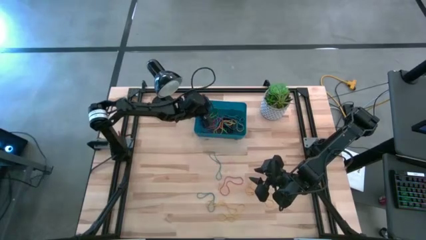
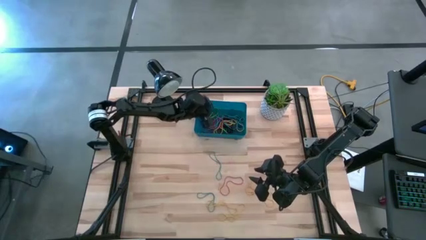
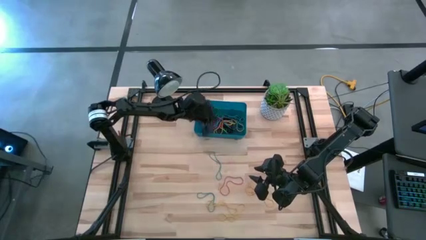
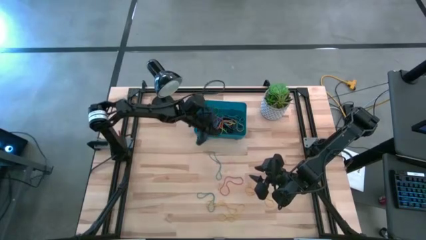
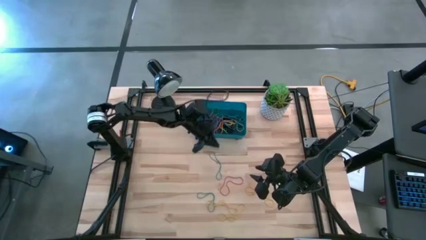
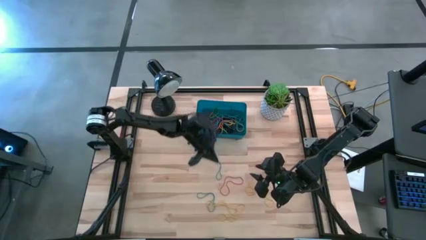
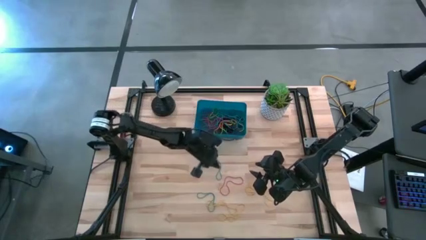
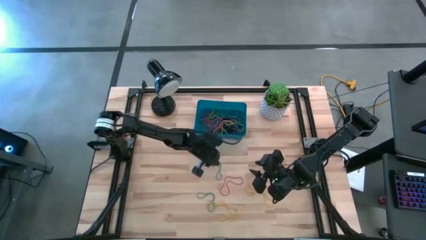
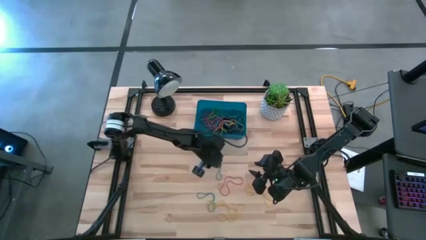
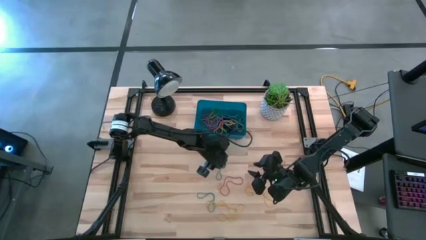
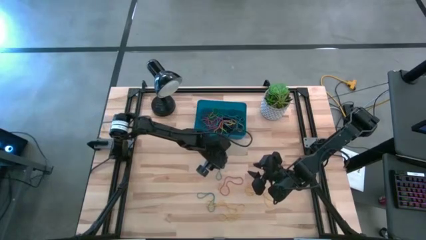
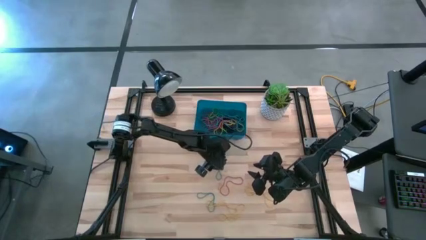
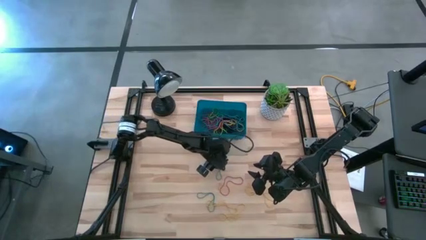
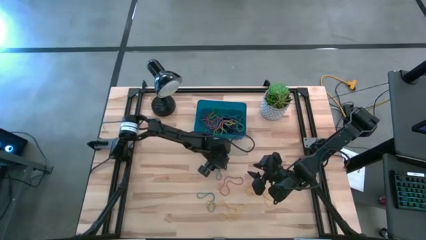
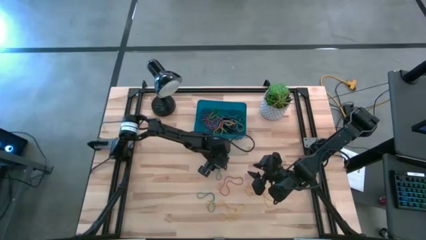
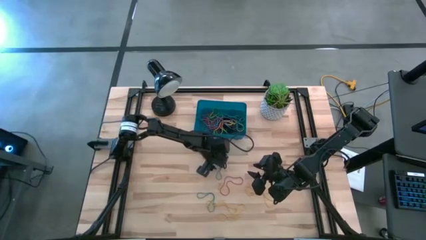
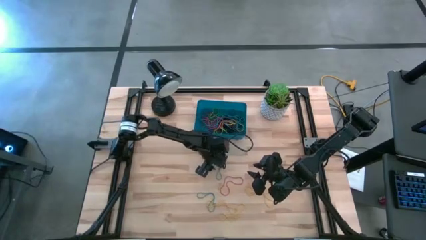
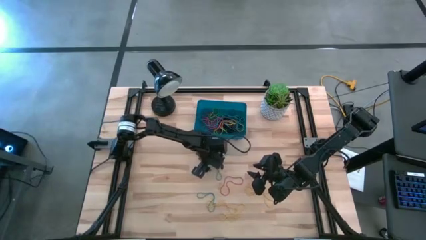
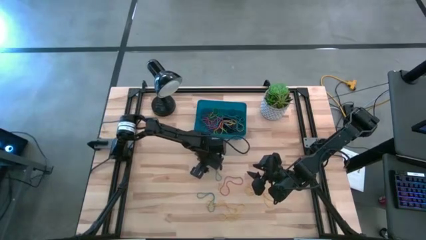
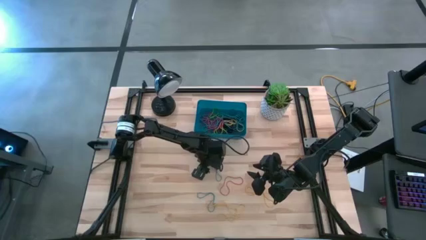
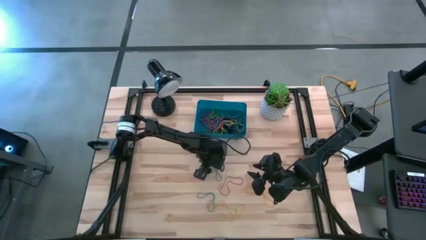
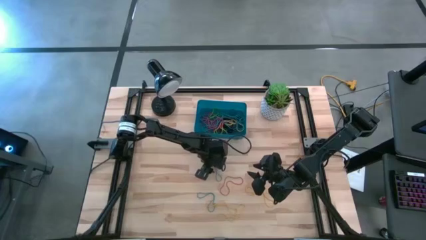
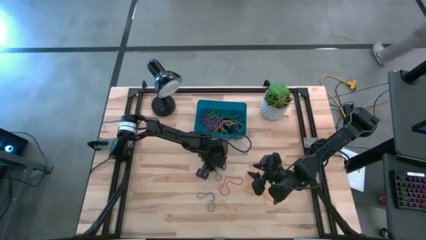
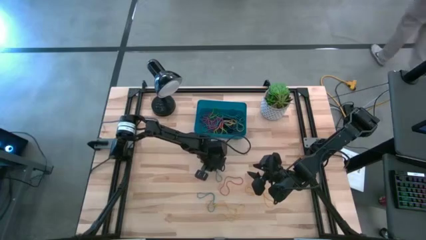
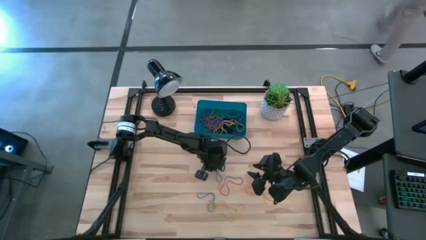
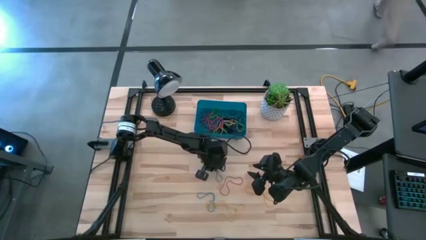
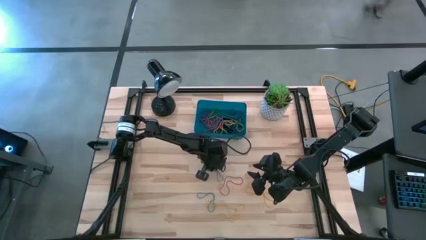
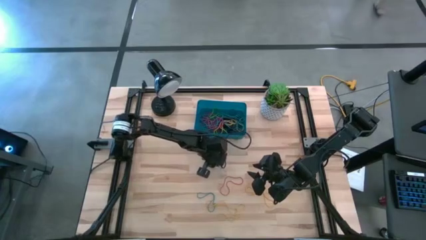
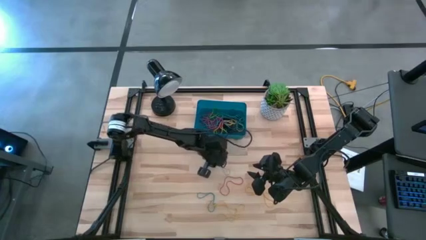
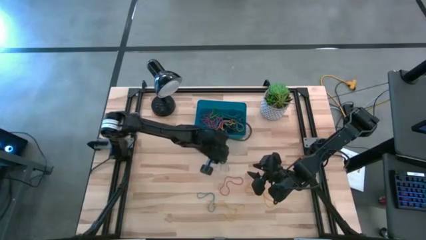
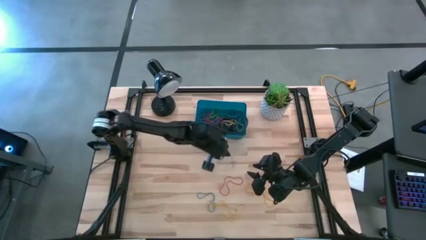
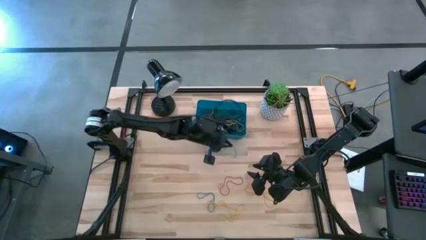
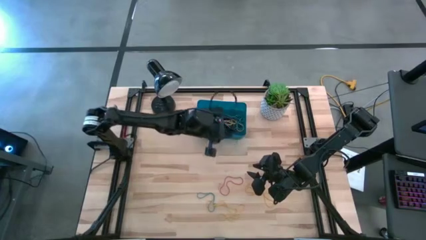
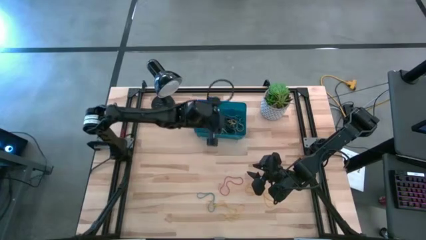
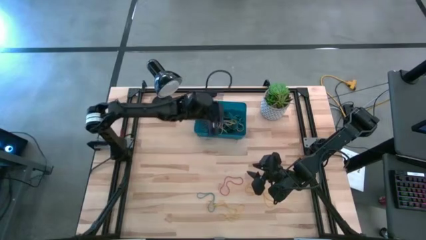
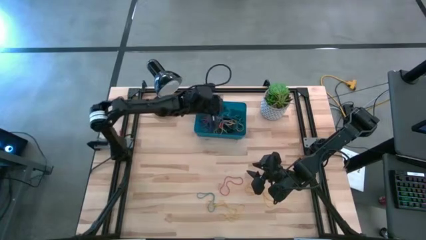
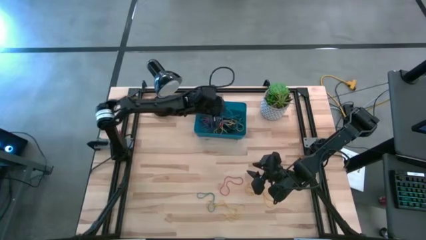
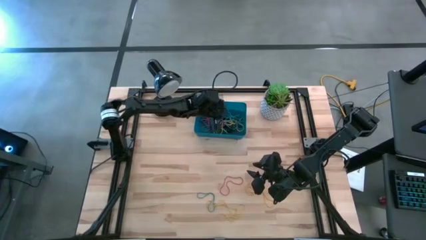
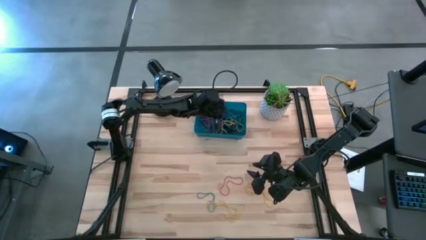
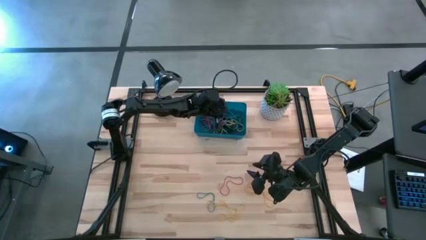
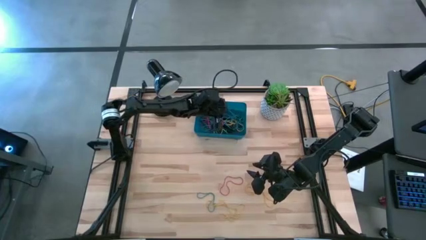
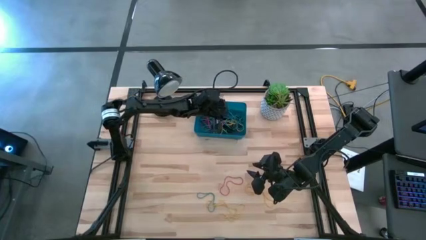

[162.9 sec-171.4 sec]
Task: Pick and place rubber bands into bin
Put the top blue rubber band into the blue bin

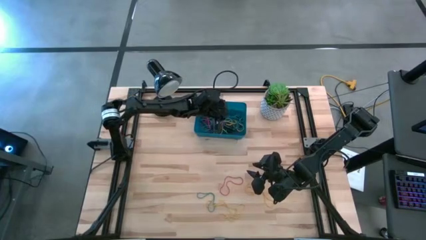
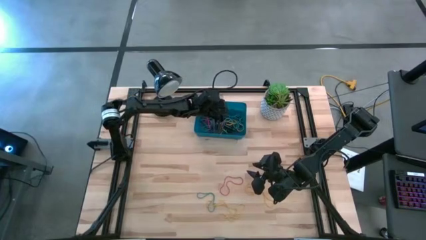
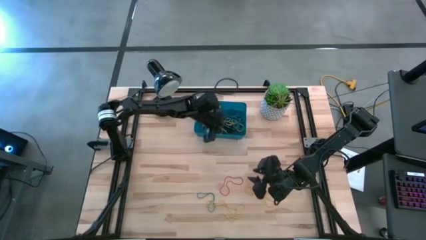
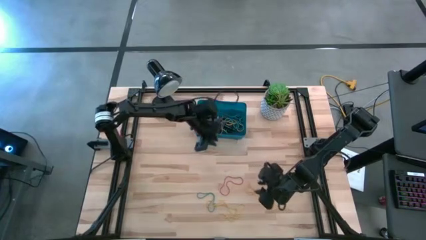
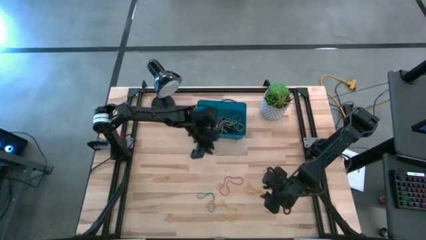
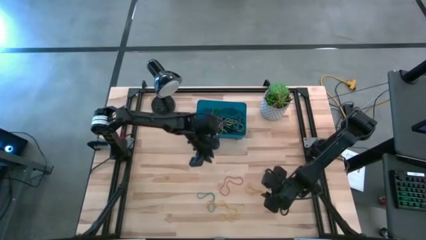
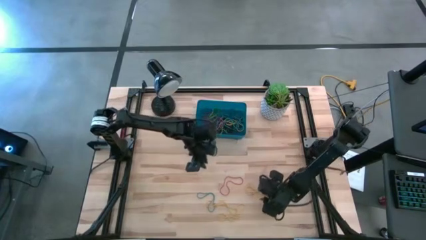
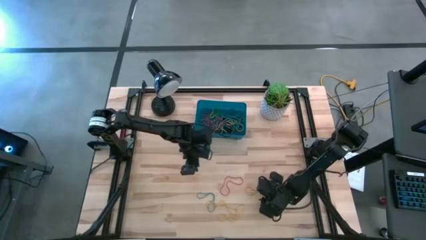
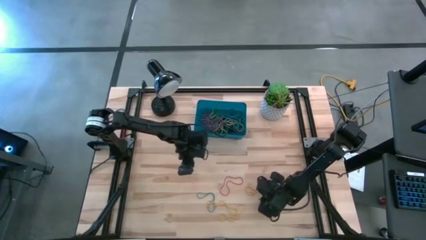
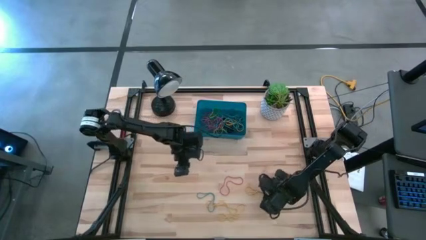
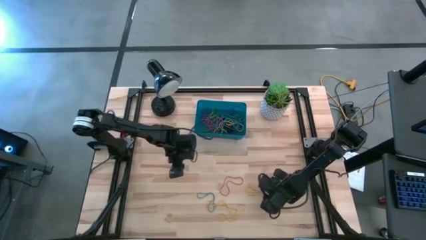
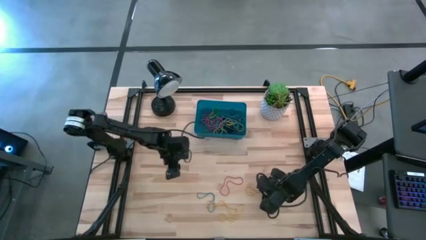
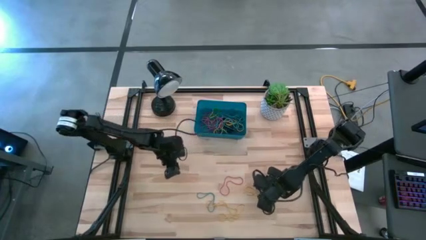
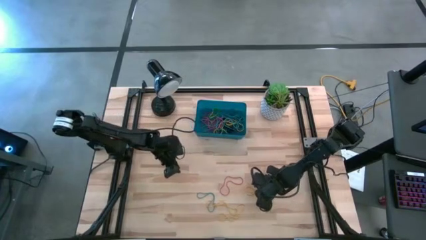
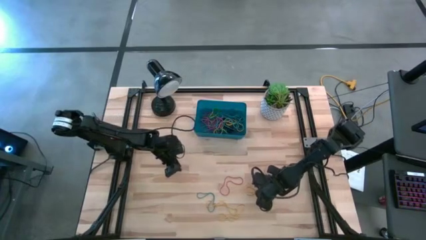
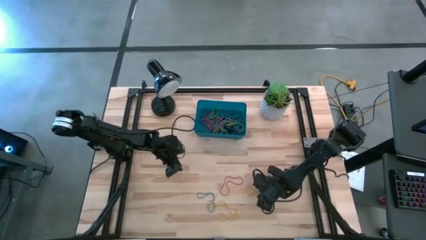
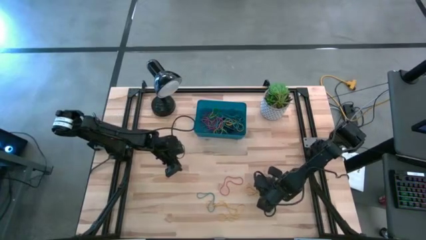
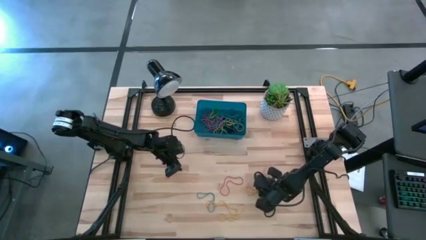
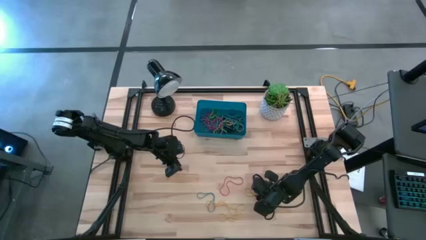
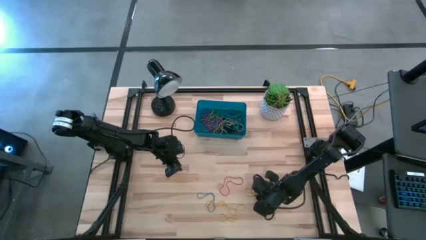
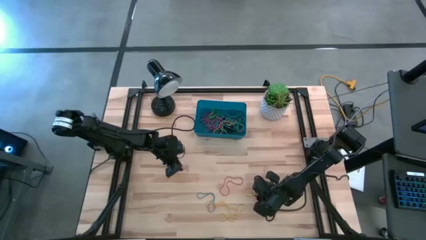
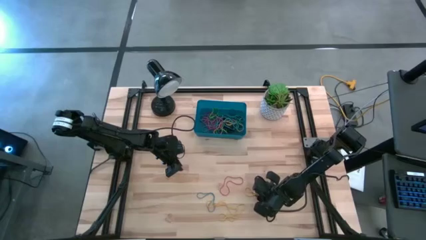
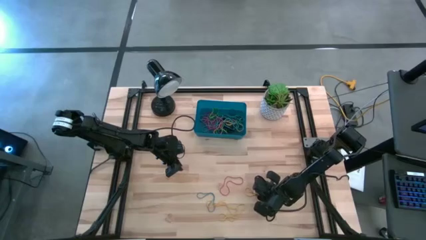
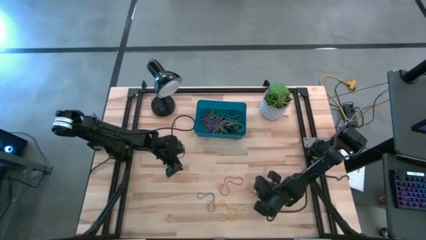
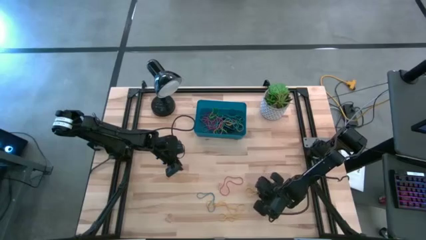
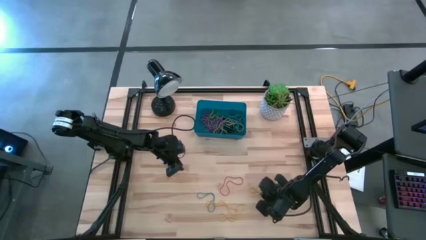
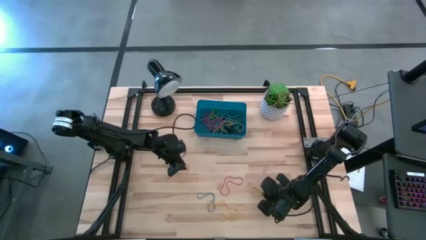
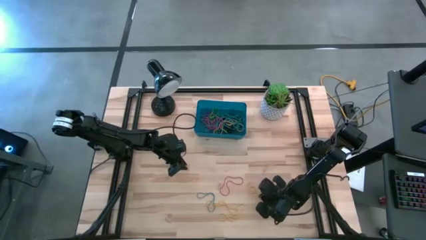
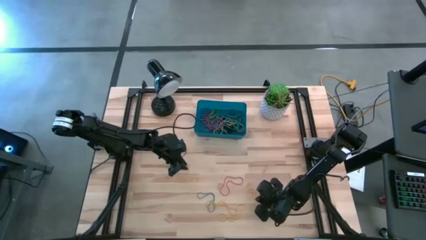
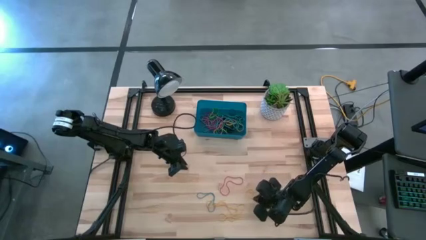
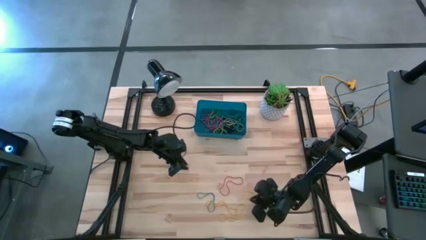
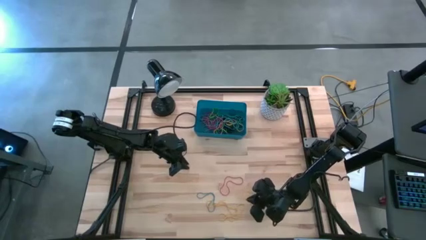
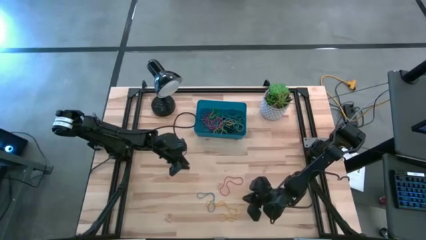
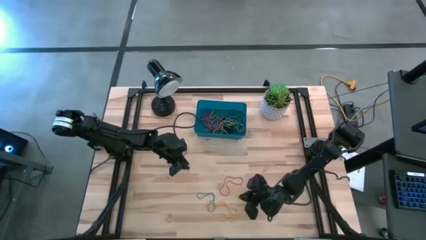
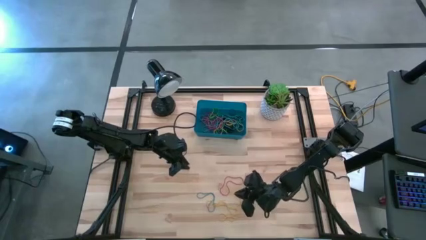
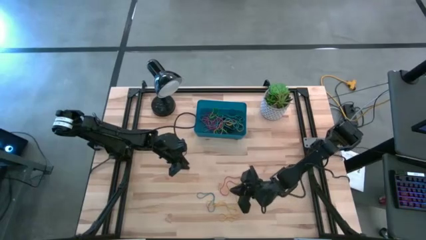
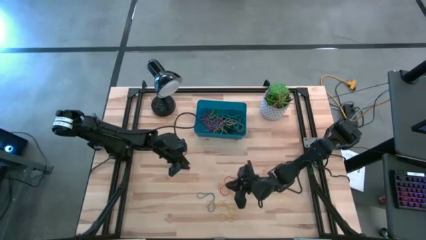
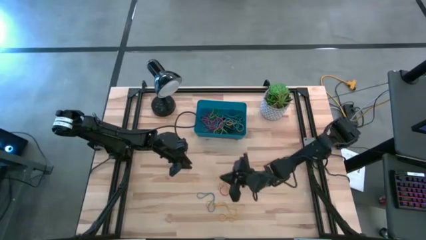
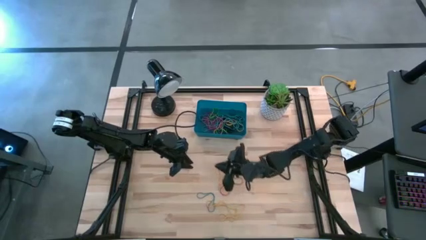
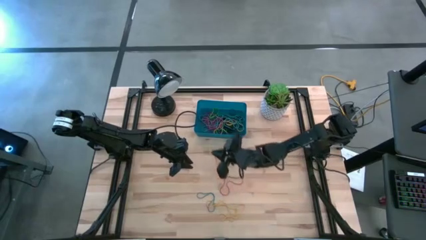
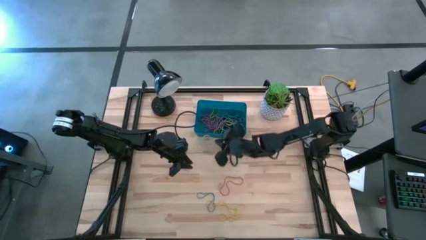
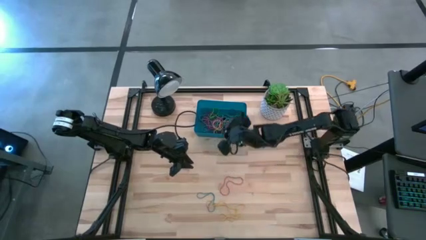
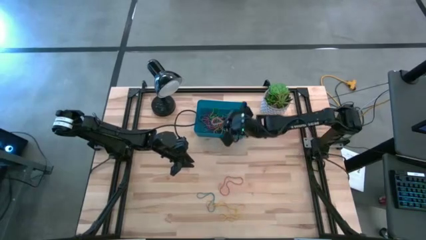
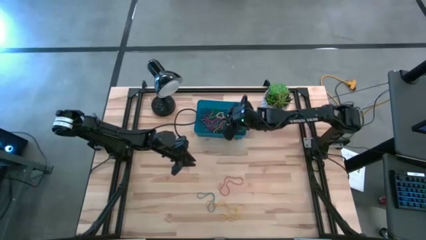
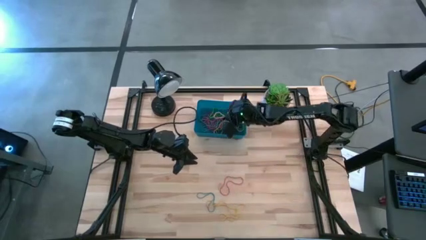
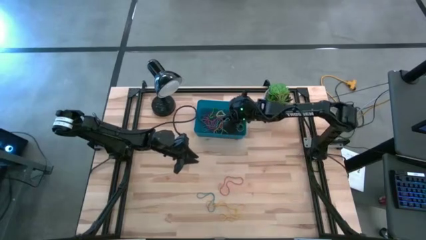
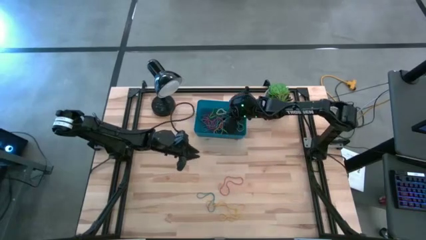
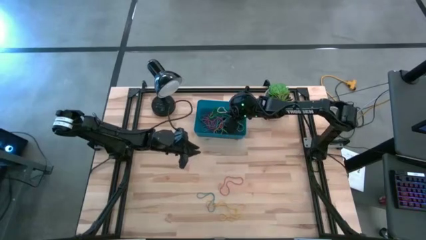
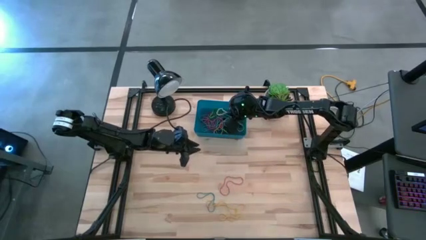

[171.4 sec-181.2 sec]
Put the top yellow rubber band into the blue bin
